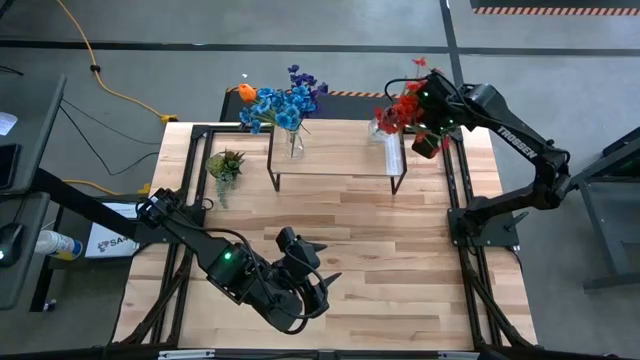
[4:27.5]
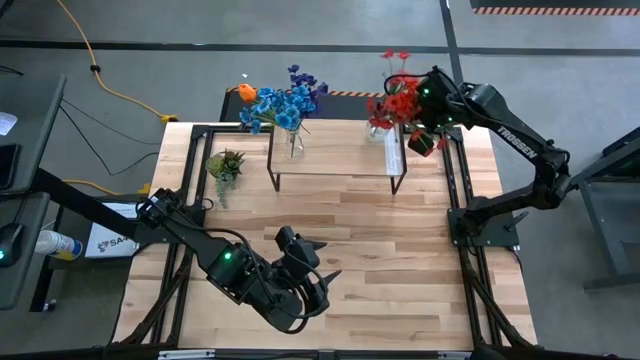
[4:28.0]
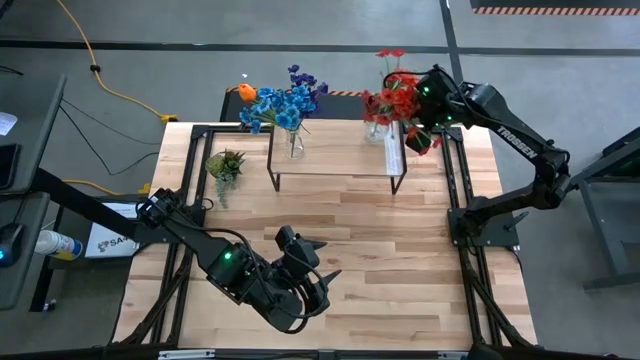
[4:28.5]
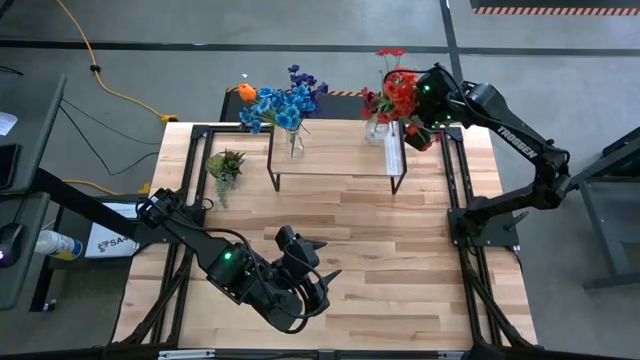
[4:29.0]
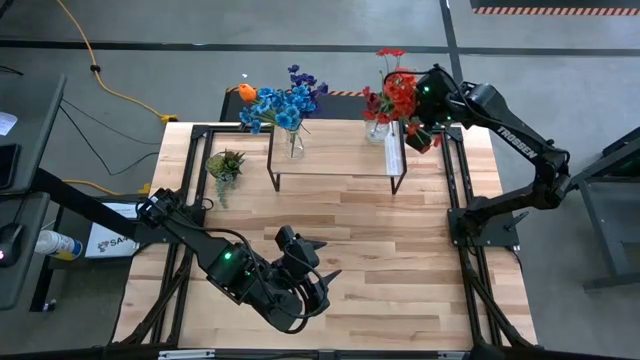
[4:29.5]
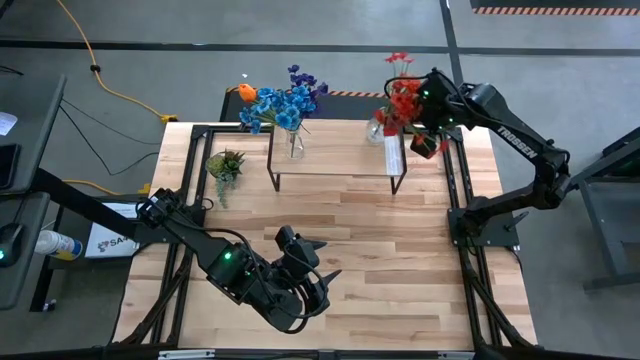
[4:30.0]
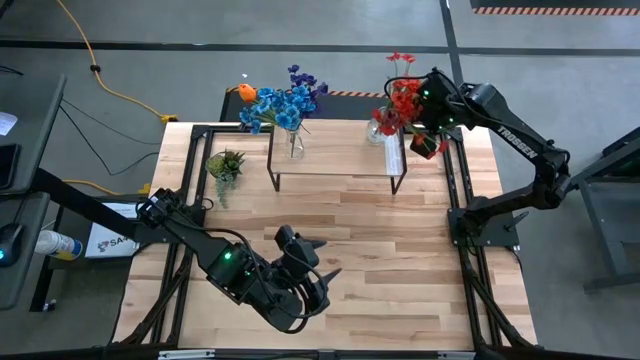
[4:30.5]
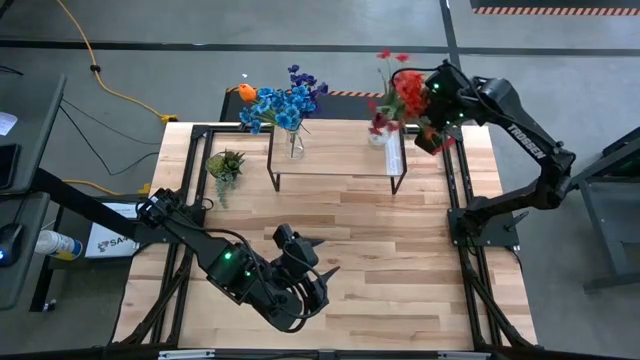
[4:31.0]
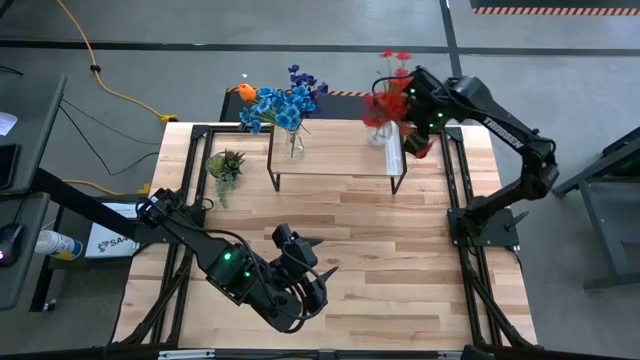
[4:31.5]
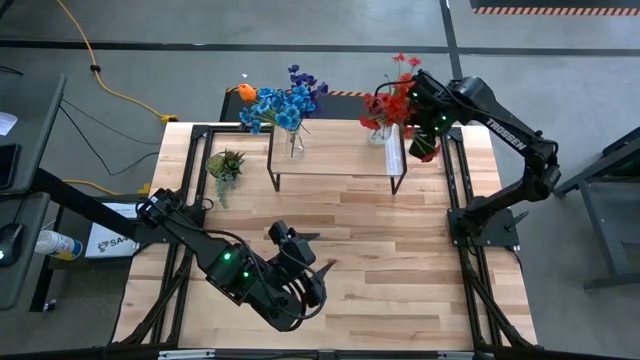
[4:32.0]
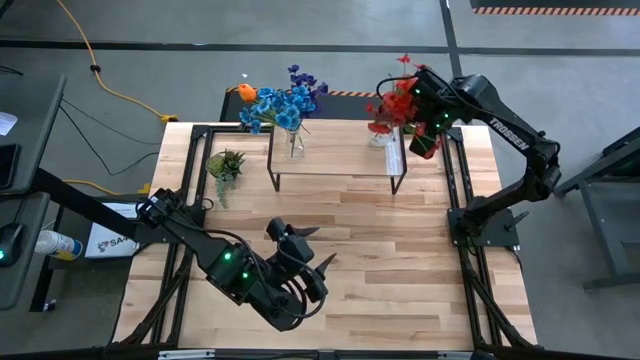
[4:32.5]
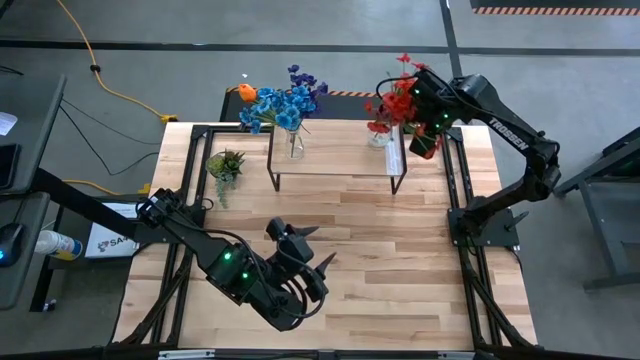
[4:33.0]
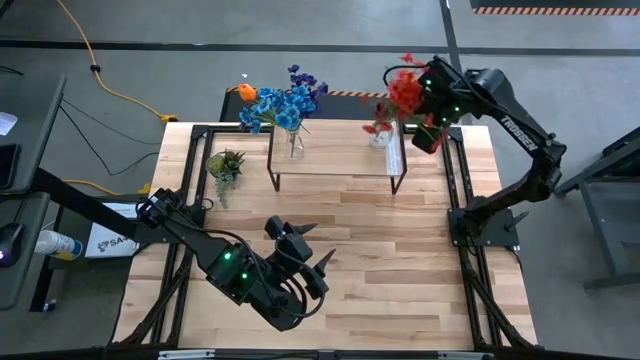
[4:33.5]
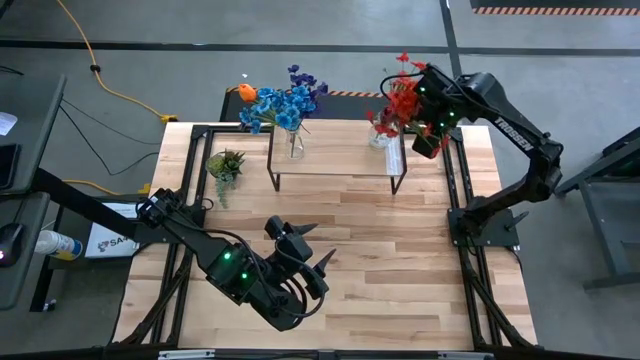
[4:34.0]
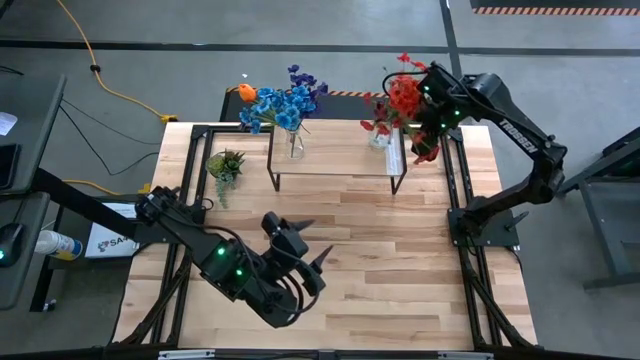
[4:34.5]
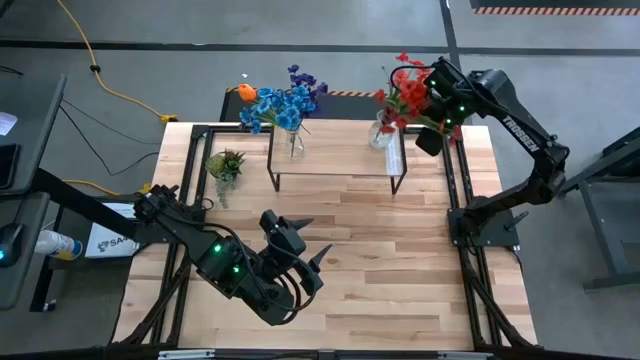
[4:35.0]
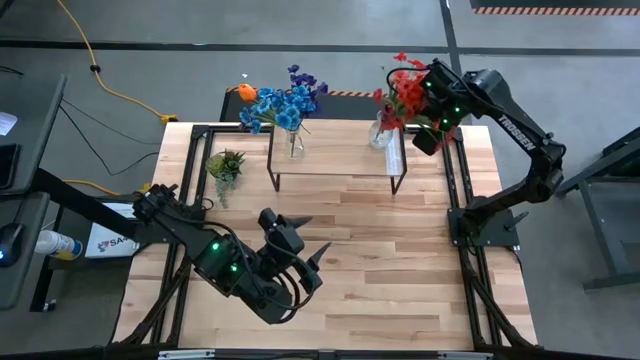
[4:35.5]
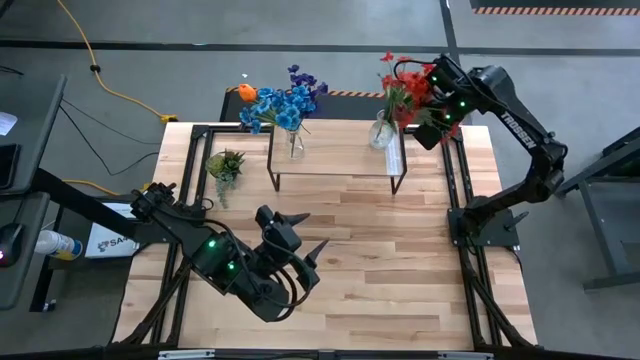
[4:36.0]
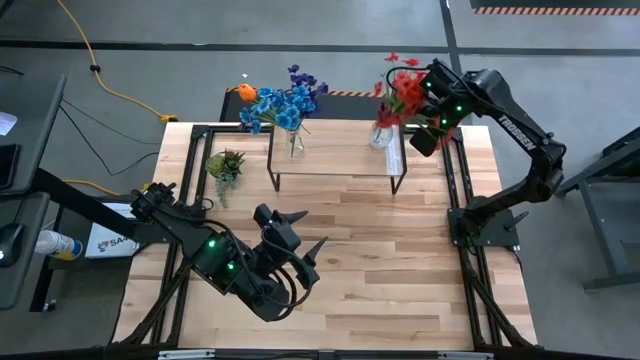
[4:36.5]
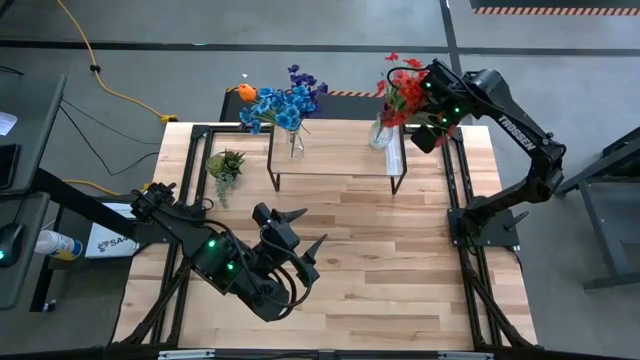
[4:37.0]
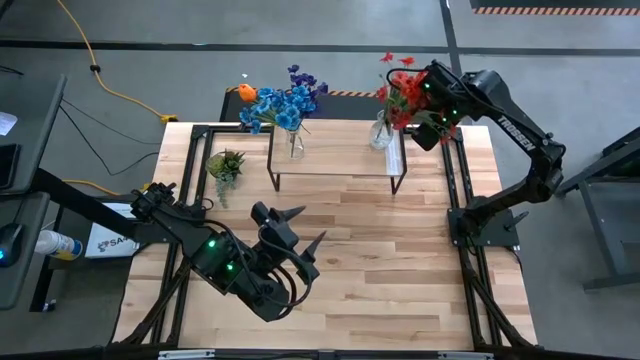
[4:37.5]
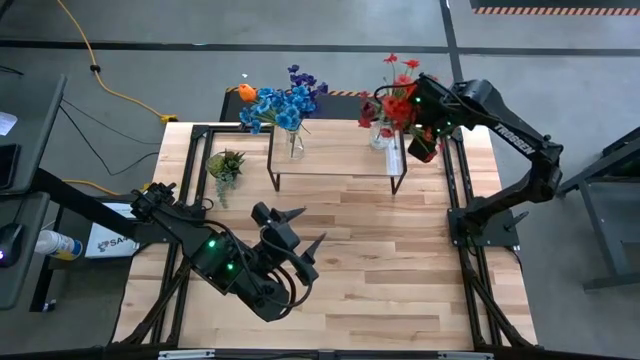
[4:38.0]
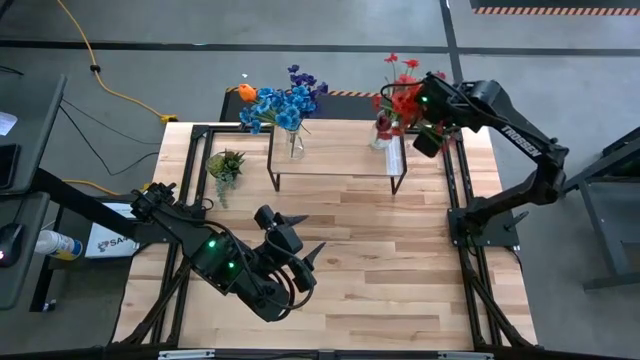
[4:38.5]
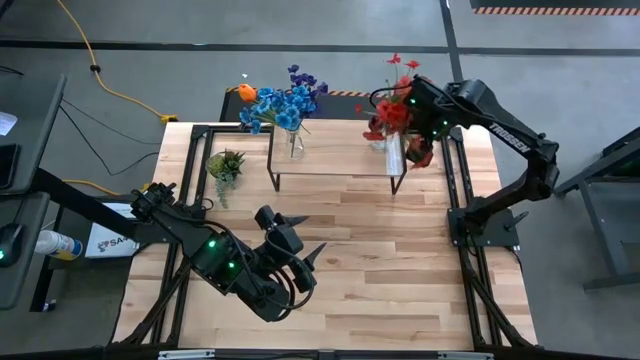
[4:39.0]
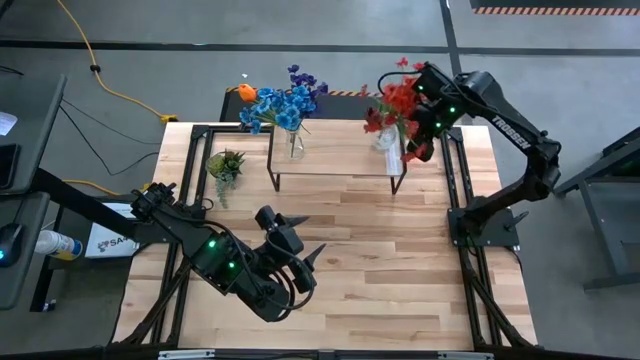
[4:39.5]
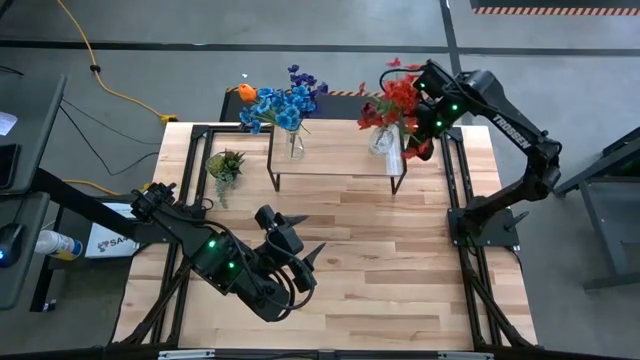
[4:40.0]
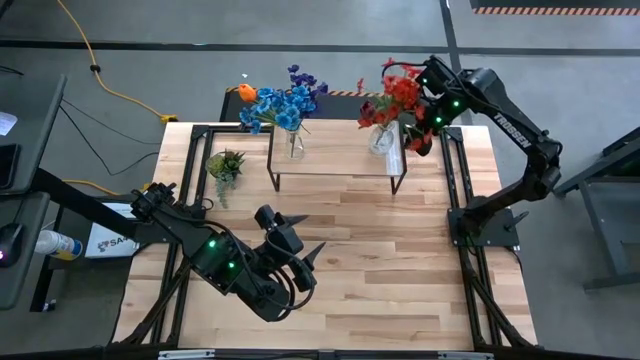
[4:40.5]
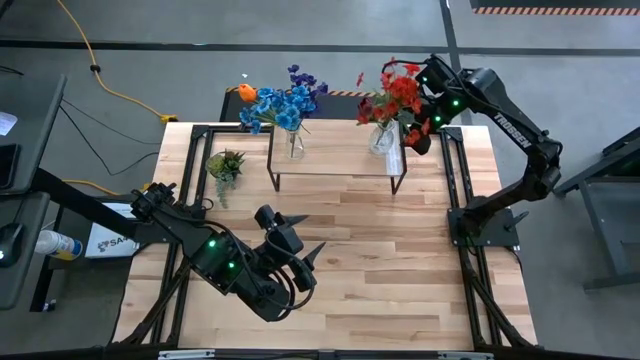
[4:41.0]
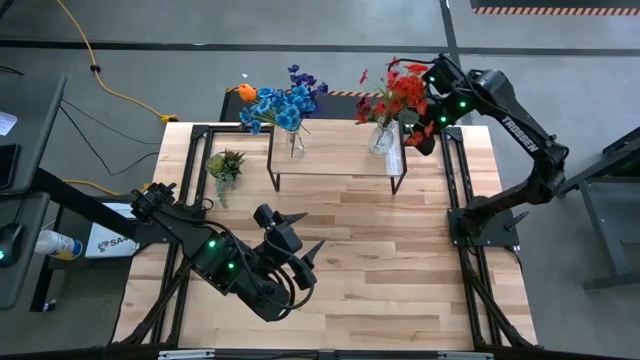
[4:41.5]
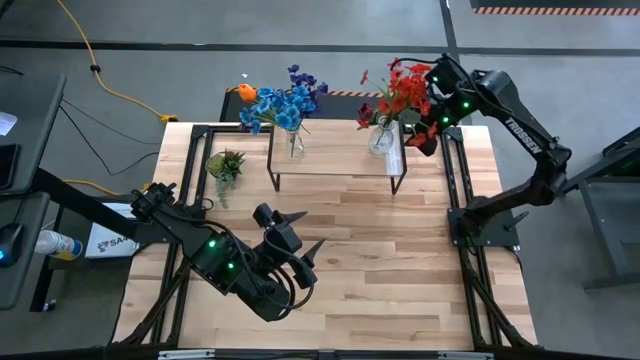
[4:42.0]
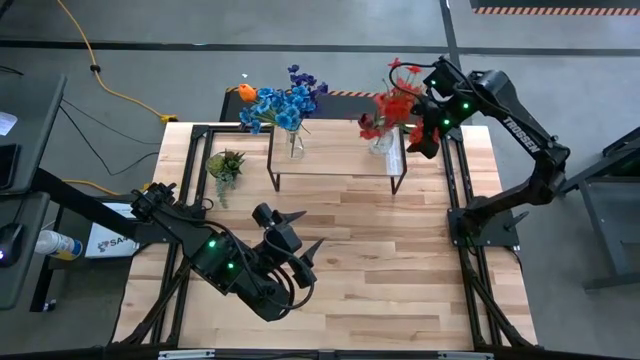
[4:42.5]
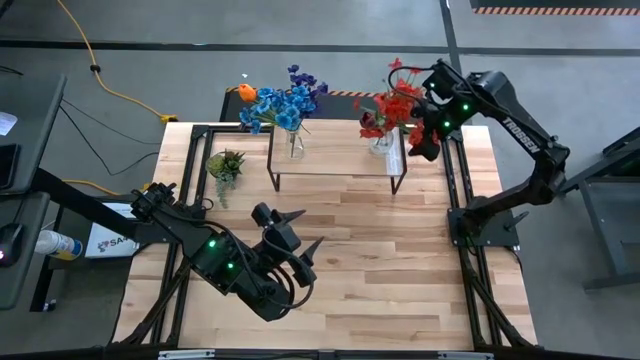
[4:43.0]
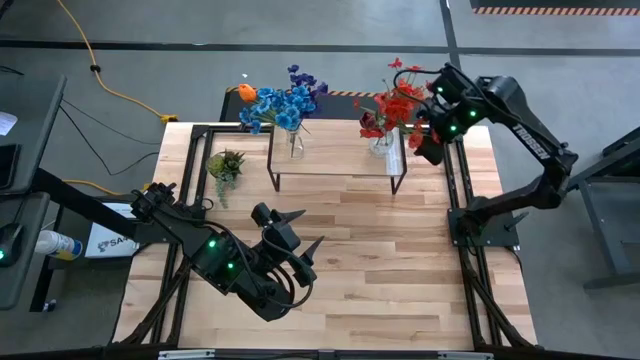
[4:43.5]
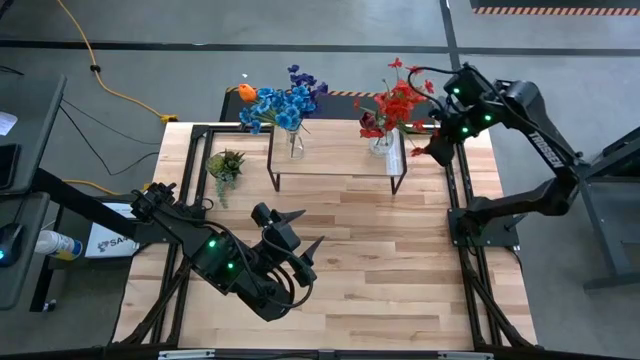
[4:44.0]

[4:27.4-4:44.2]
Task: Pick and place flowers into a vace then onto a shelf
Put the right flowers transparent vase on the shelf

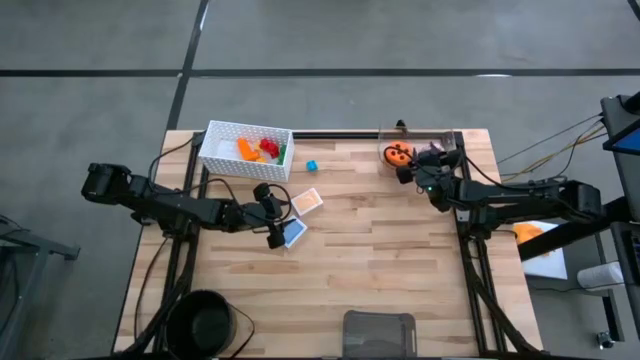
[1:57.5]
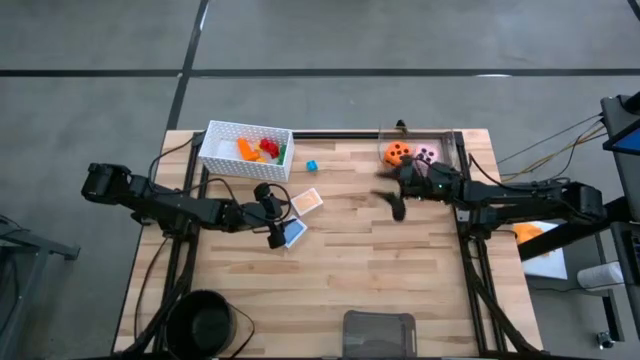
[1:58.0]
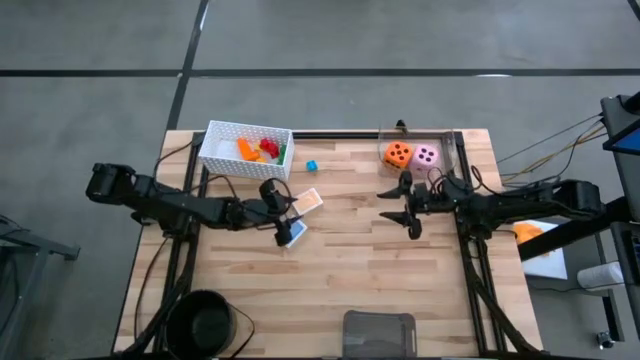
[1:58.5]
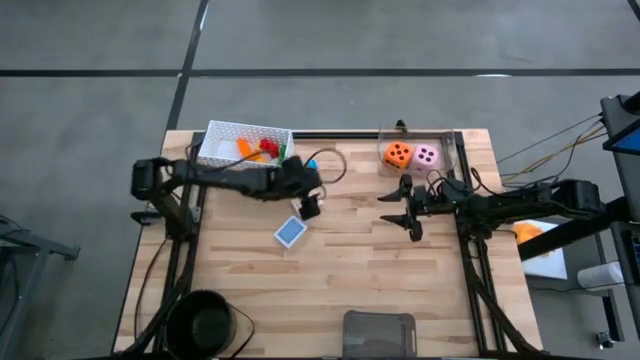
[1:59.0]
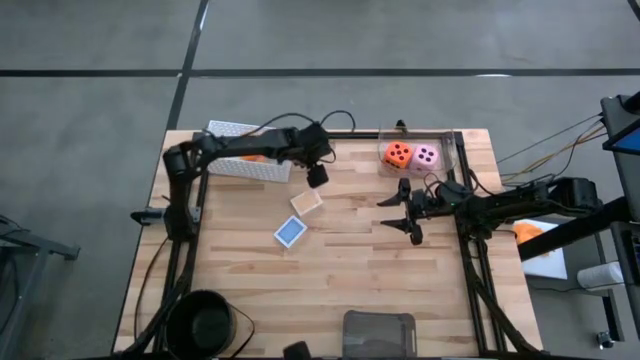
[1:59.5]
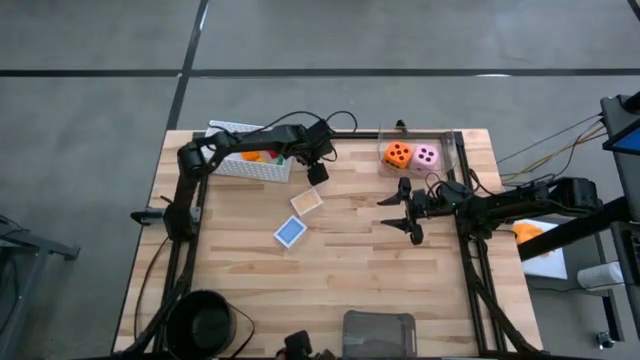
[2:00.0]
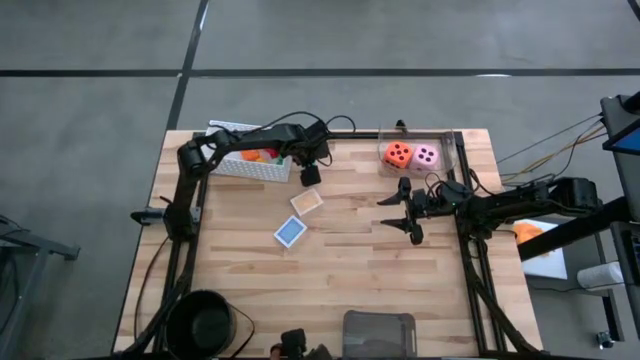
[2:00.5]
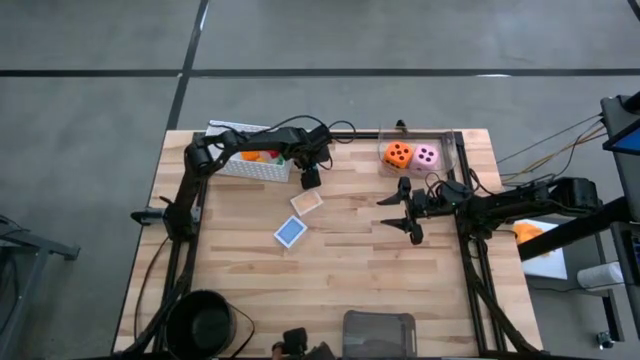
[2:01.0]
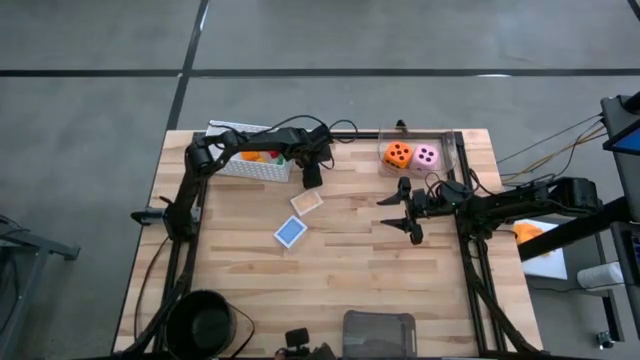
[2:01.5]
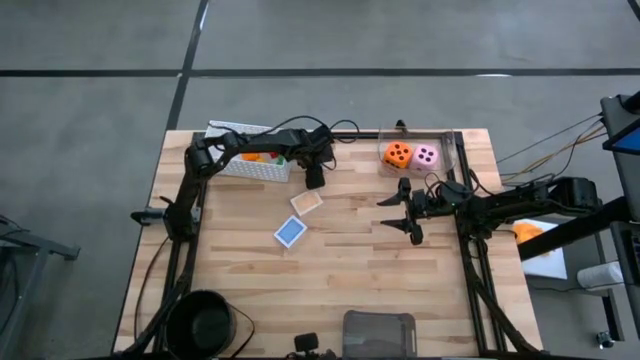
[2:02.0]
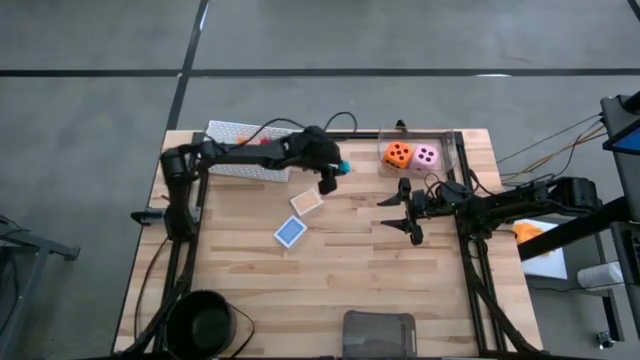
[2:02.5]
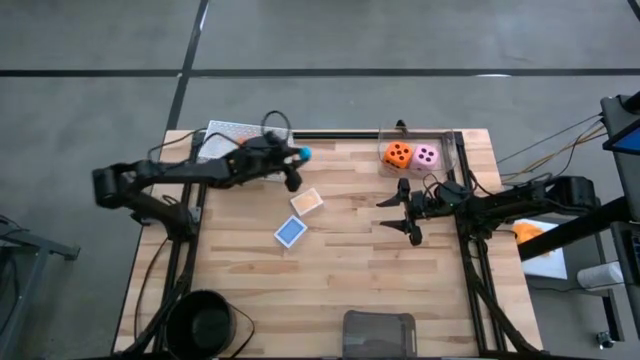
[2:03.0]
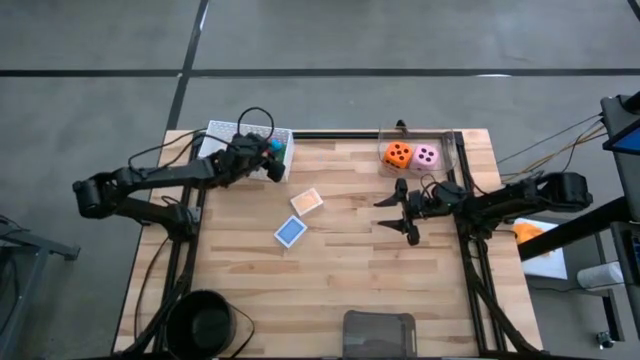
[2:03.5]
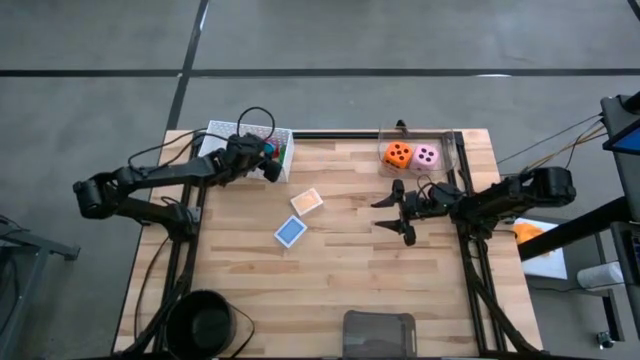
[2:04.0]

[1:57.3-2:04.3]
Task: Pick & Place Toys
Put the small blue game piece into the white bin
